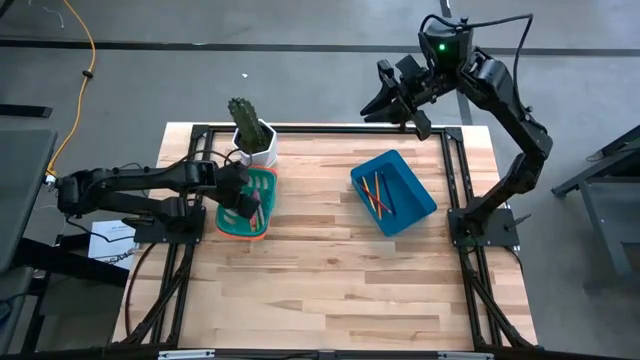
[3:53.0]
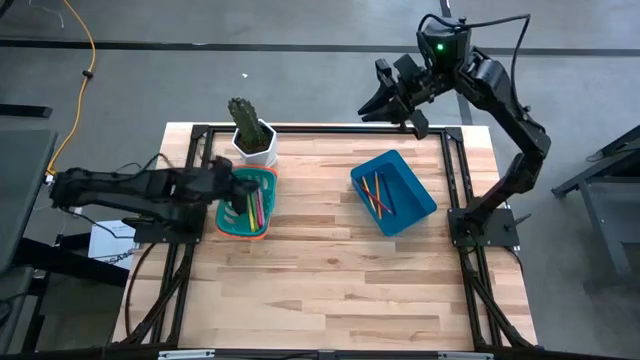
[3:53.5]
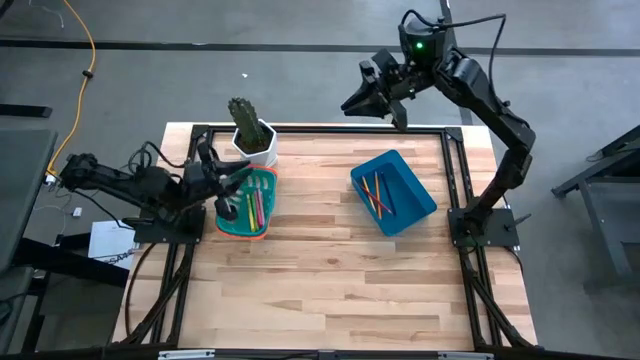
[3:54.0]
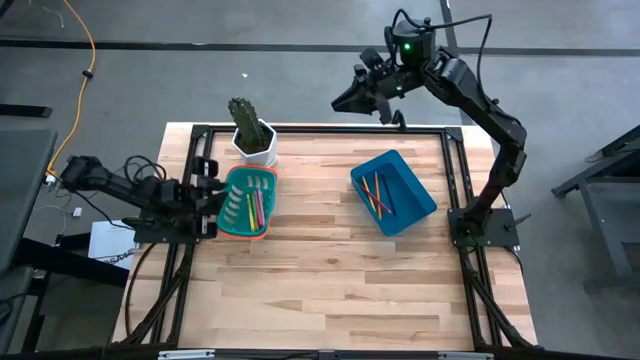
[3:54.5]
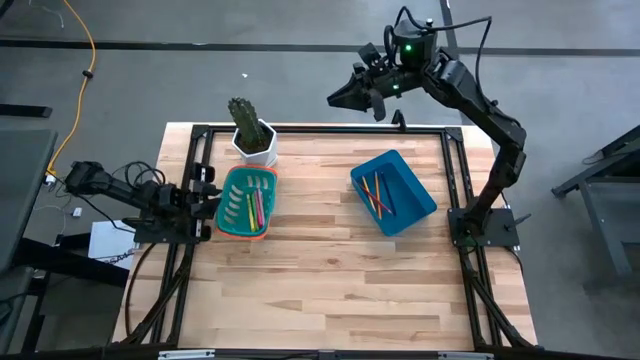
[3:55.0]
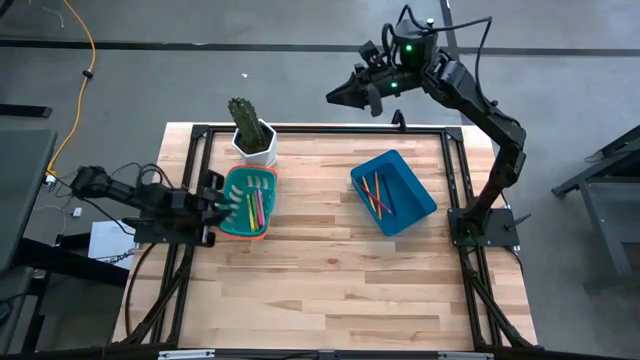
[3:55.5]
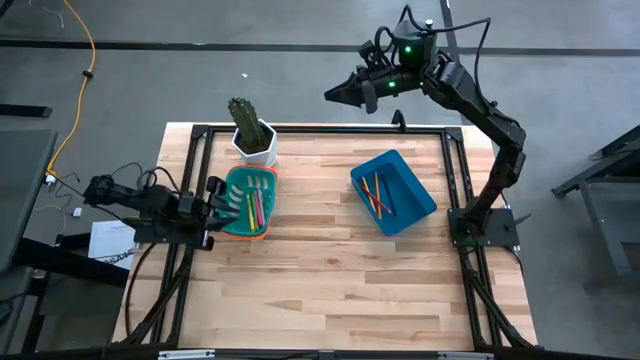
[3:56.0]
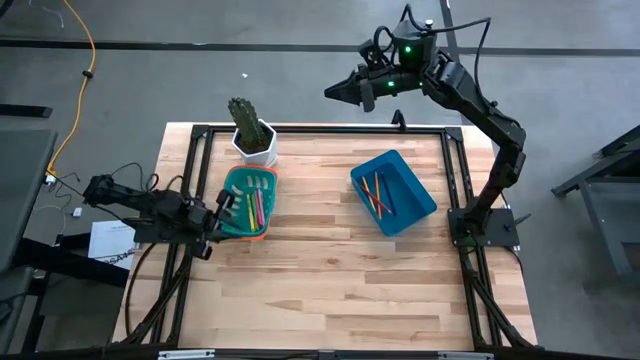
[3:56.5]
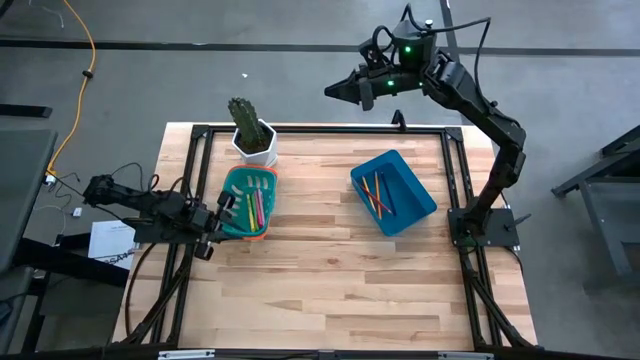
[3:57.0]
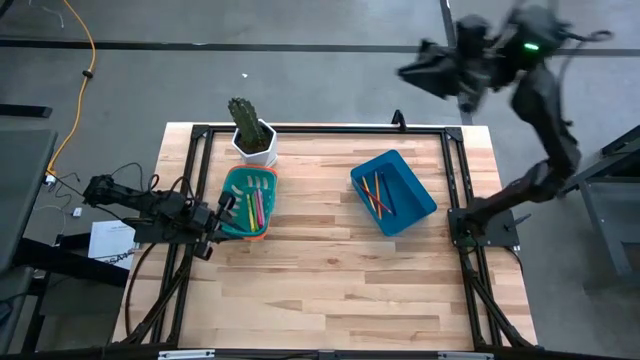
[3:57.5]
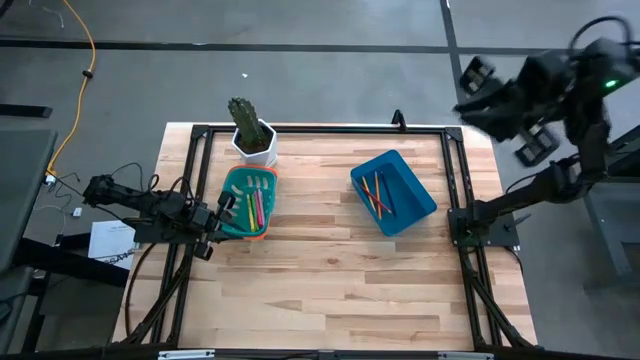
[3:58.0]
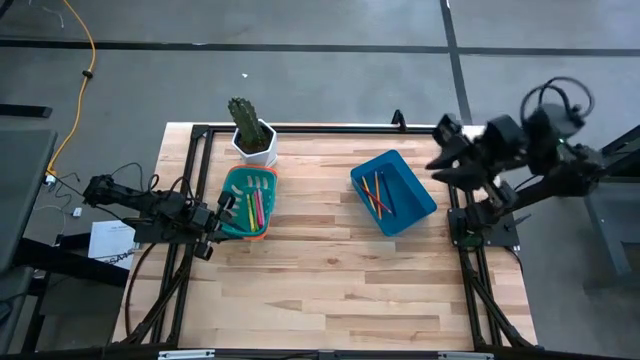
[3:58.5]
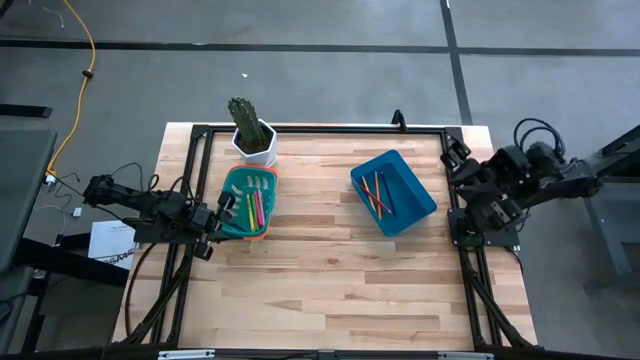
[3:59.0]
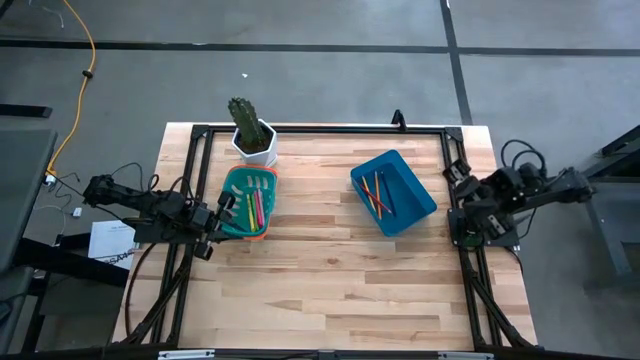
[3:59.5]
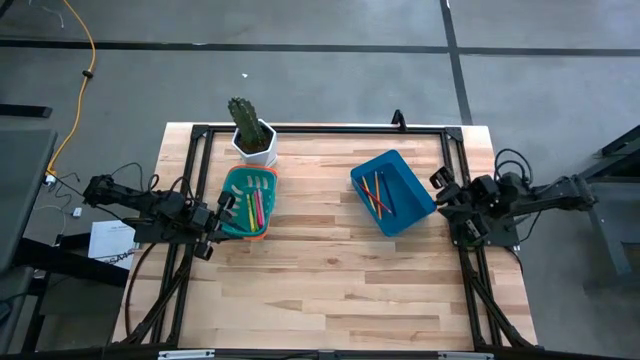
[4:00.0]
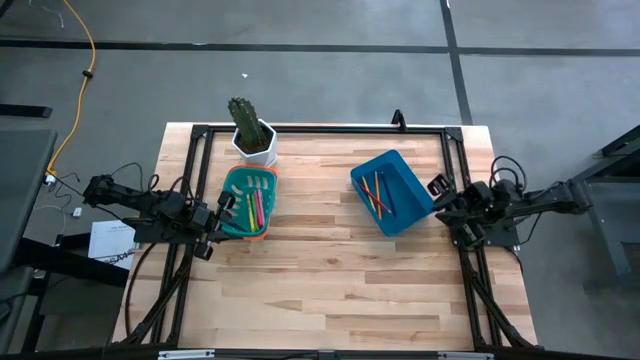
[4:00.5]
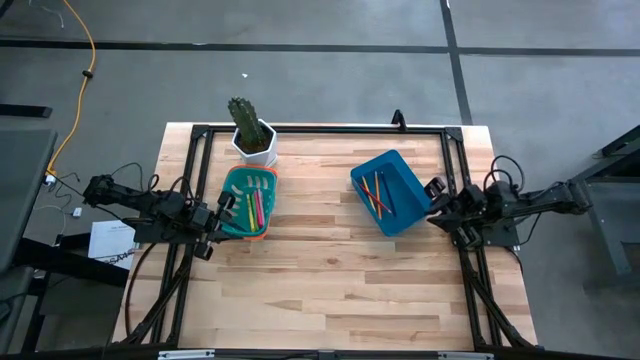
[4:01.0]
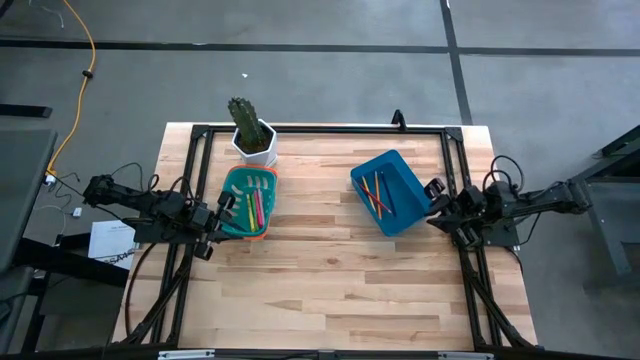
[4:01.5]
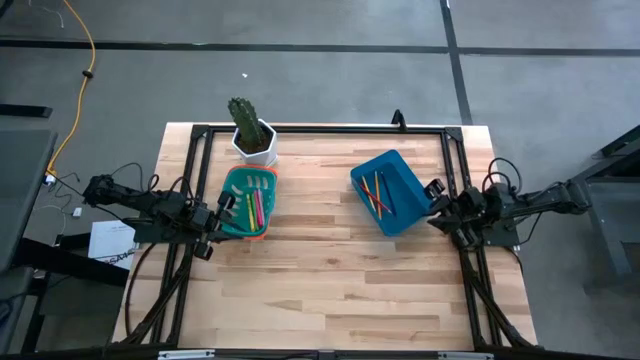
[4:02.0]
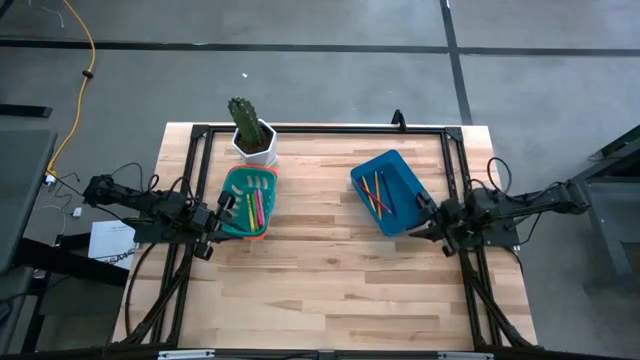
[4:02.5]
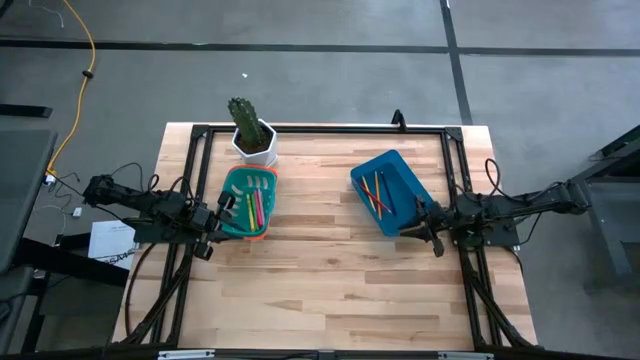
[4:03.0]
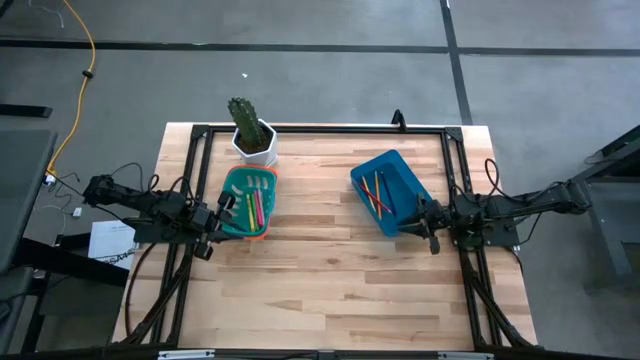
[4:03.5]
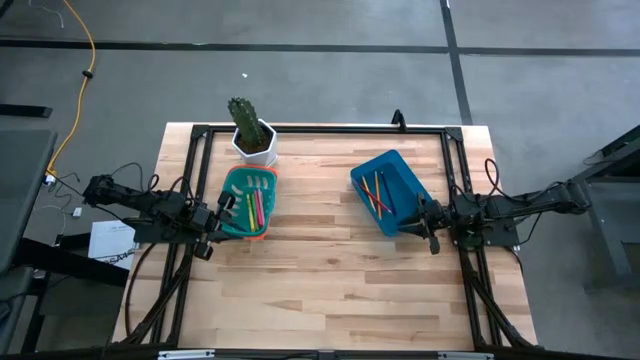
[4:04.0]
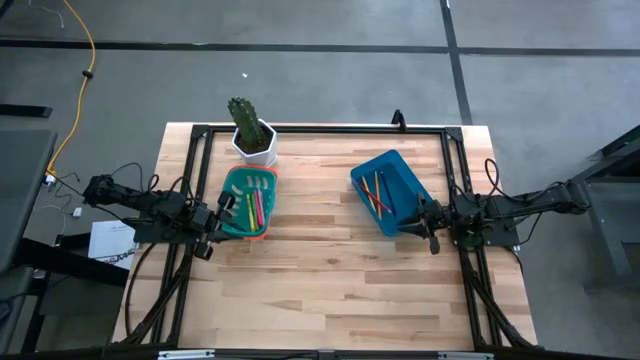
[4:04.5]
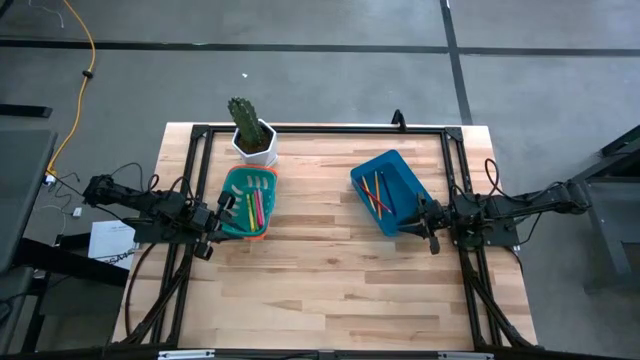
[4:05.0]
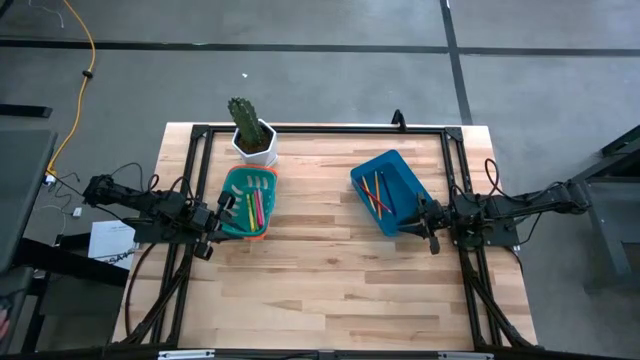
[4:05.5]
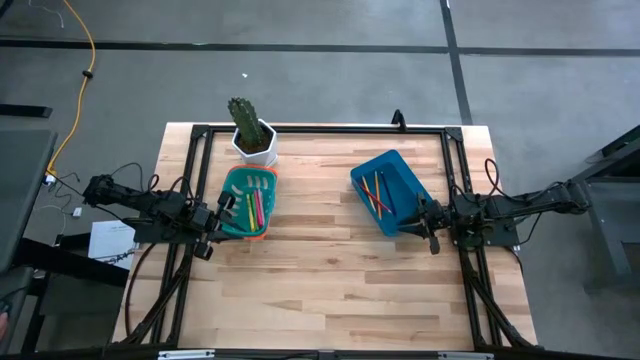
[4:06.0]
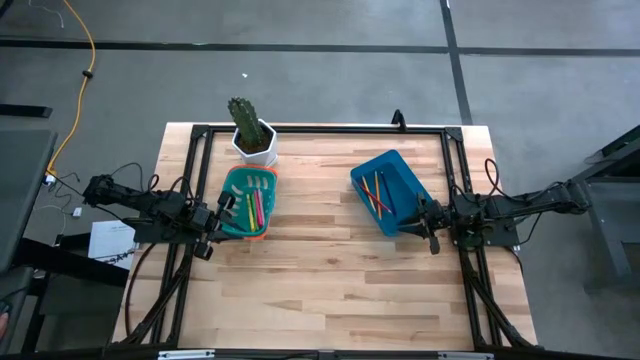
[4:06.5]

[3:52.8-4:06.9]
Task: Sort pens & pencils
Return to Home Position
